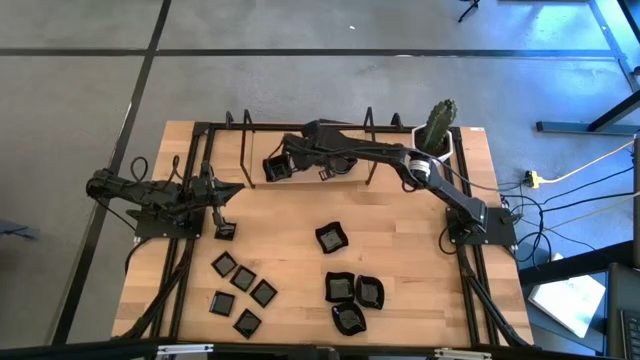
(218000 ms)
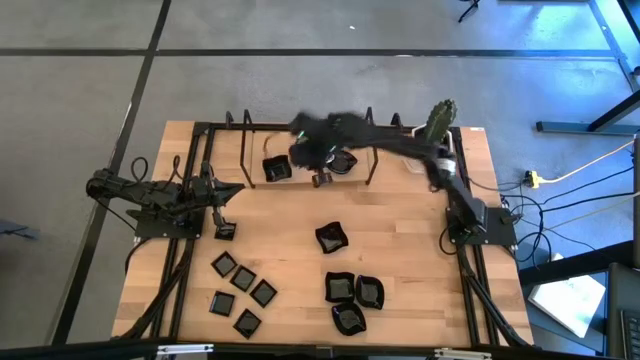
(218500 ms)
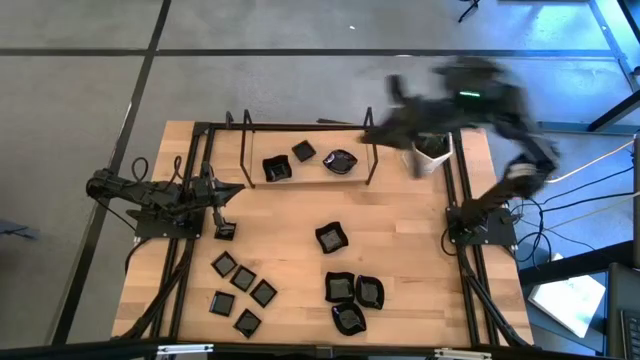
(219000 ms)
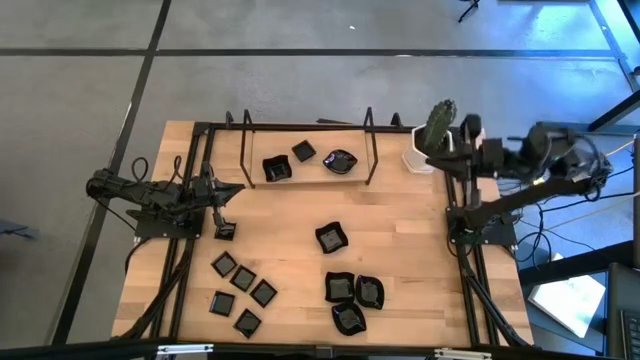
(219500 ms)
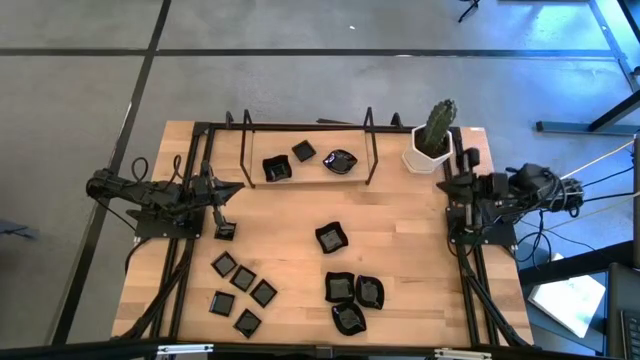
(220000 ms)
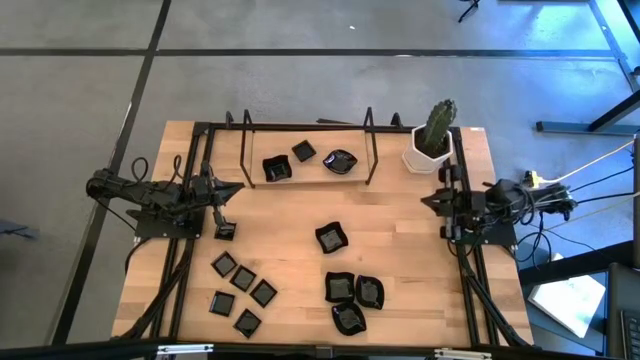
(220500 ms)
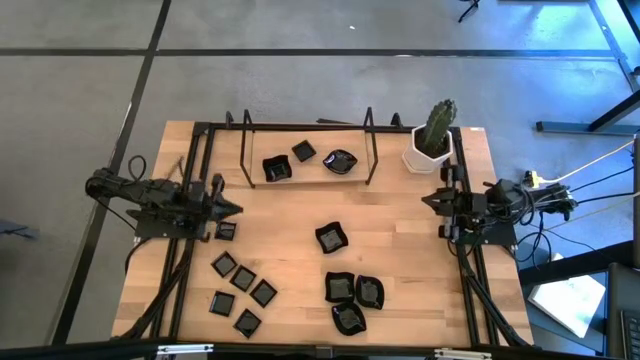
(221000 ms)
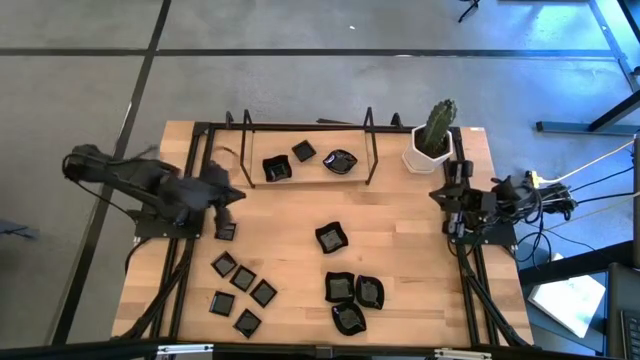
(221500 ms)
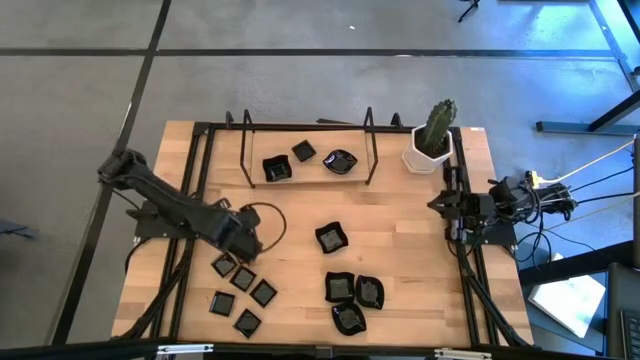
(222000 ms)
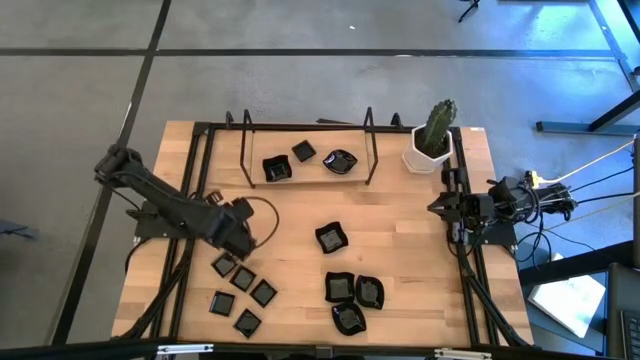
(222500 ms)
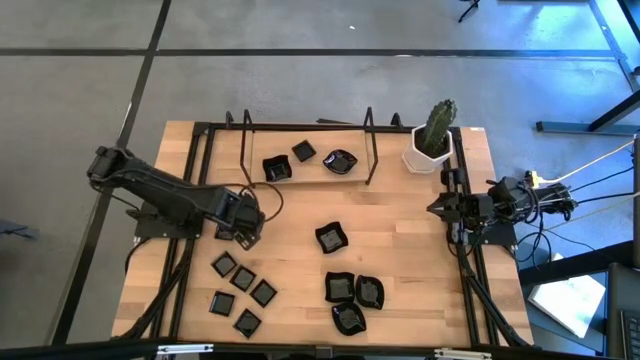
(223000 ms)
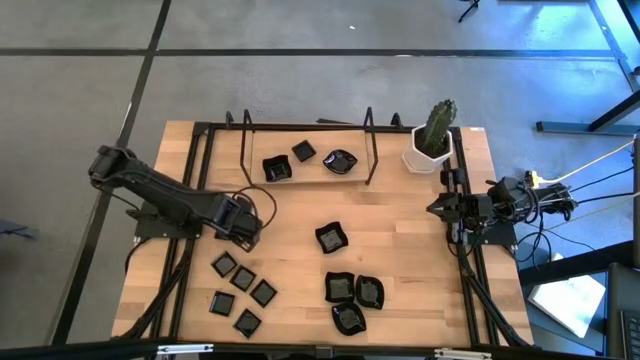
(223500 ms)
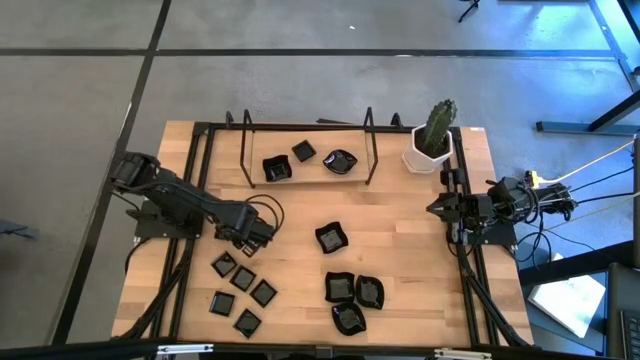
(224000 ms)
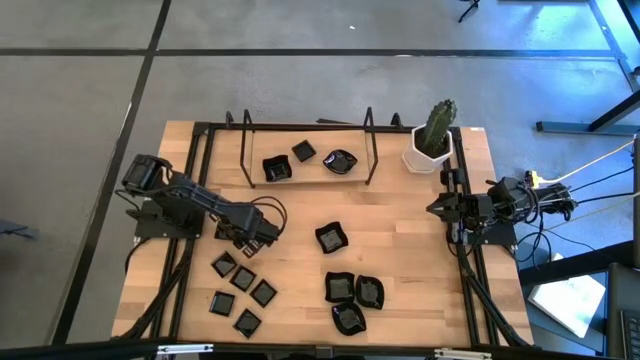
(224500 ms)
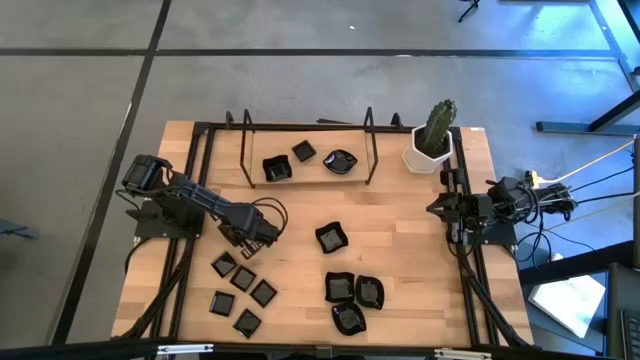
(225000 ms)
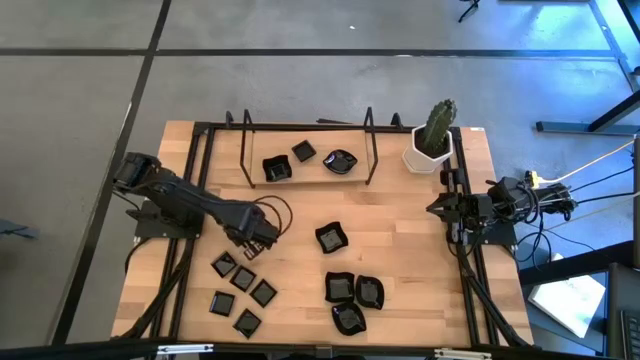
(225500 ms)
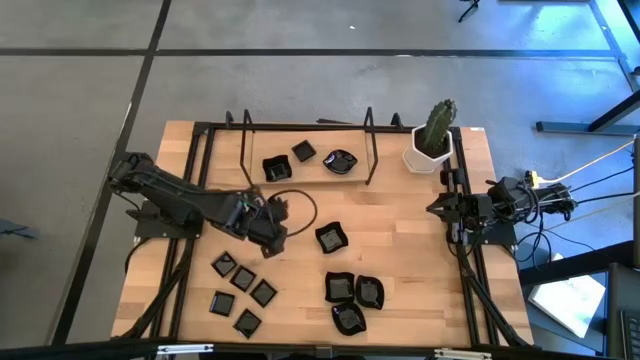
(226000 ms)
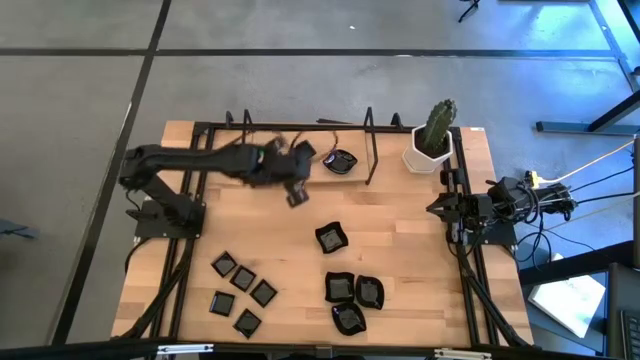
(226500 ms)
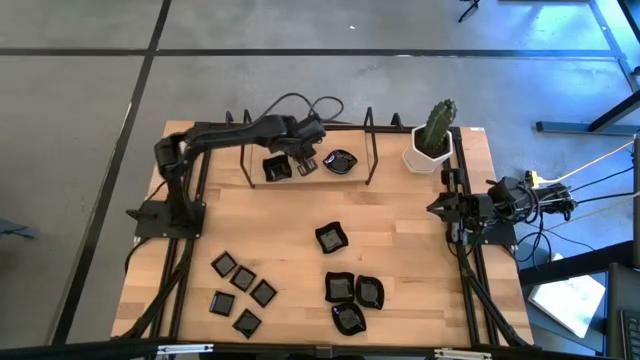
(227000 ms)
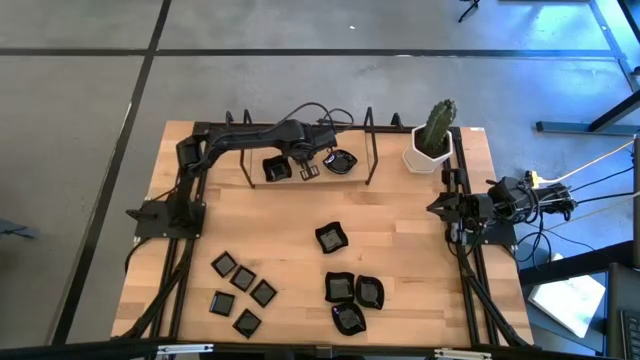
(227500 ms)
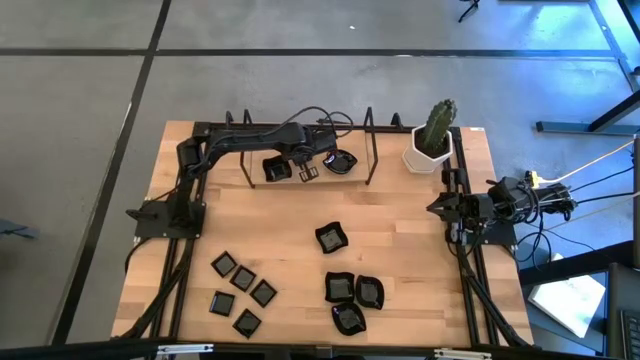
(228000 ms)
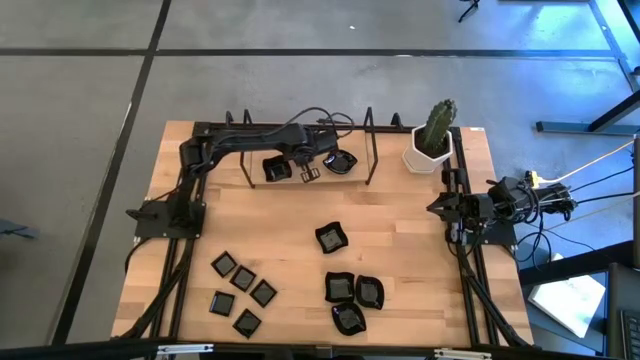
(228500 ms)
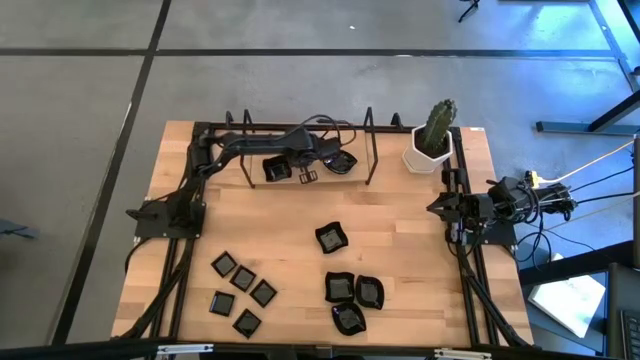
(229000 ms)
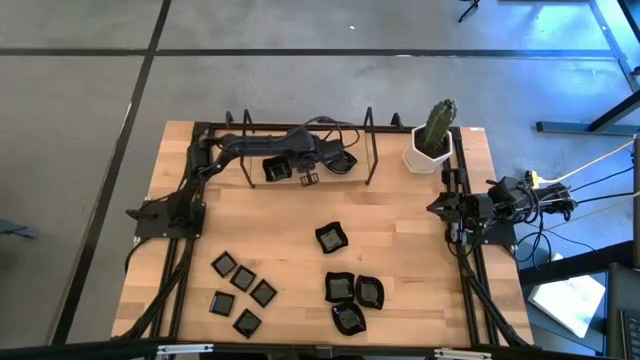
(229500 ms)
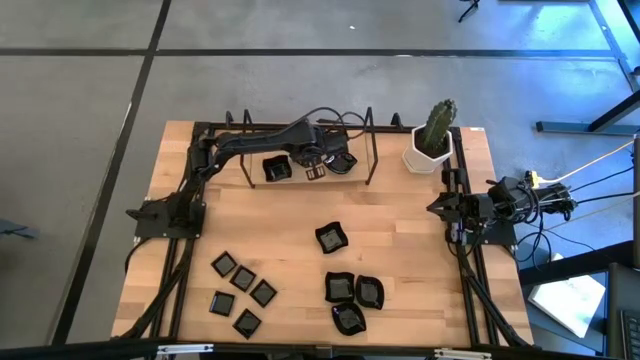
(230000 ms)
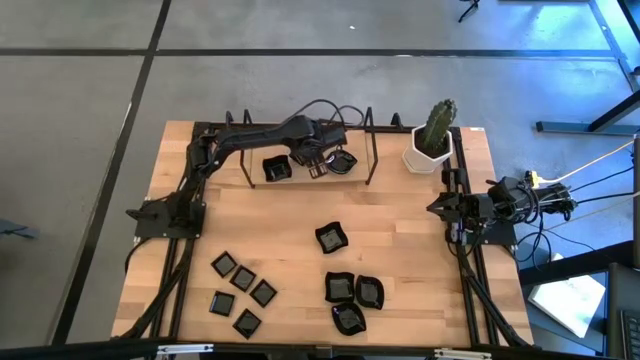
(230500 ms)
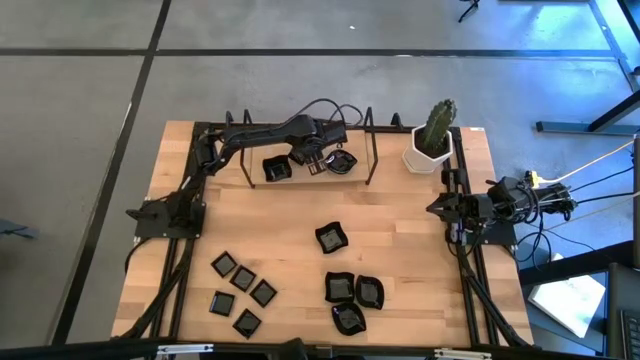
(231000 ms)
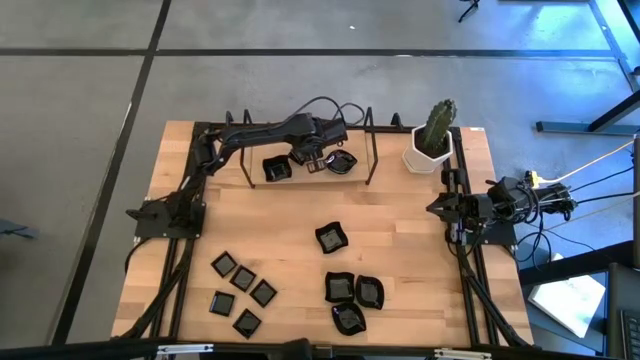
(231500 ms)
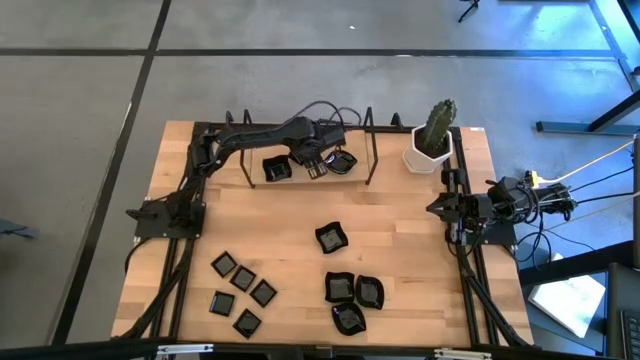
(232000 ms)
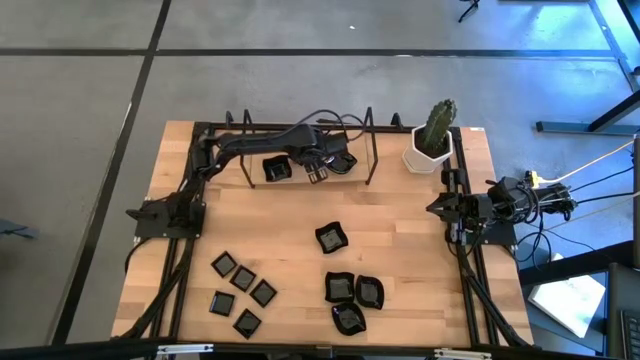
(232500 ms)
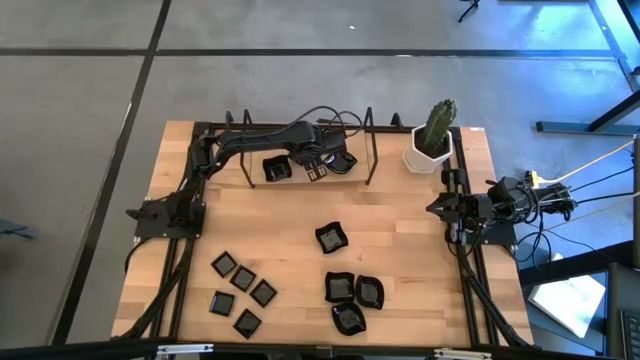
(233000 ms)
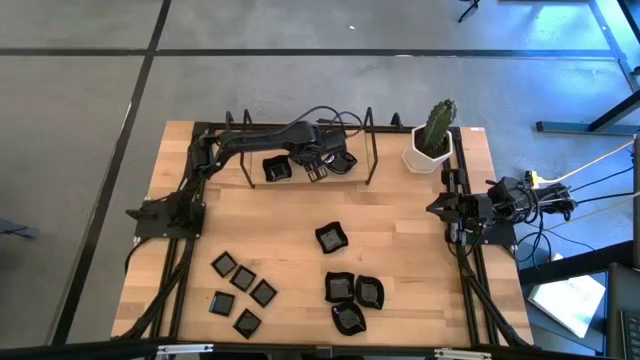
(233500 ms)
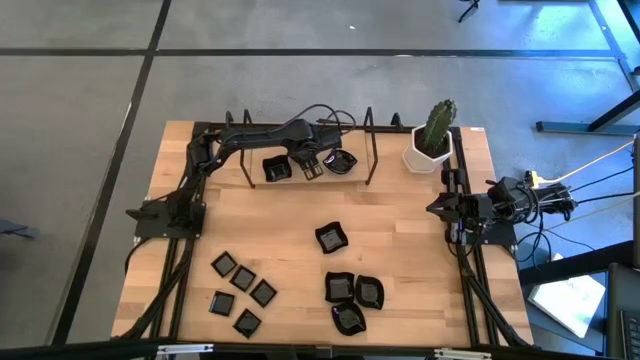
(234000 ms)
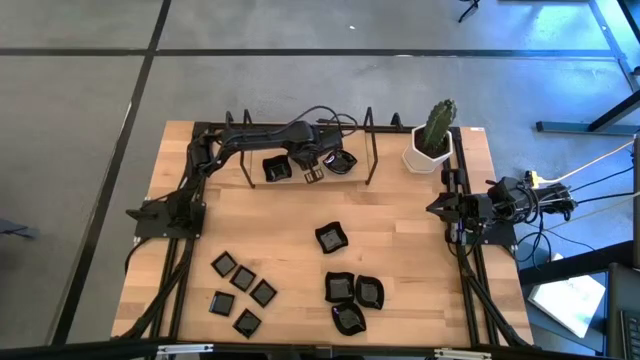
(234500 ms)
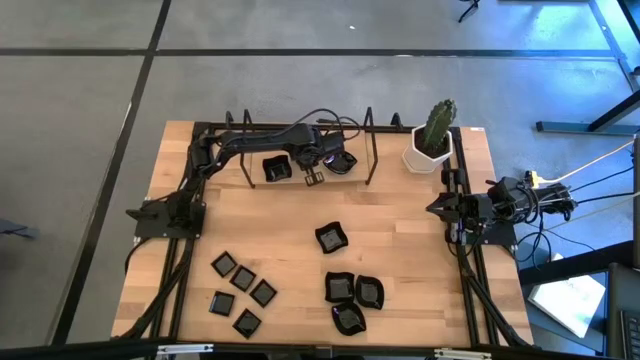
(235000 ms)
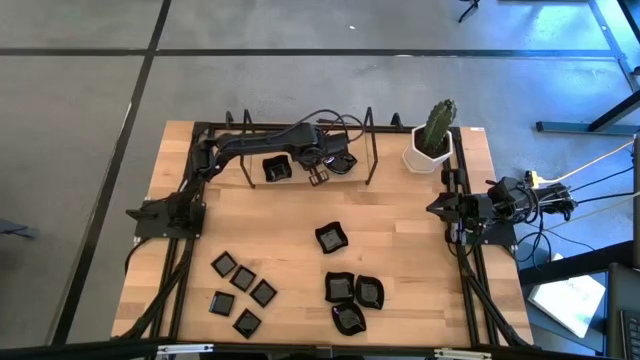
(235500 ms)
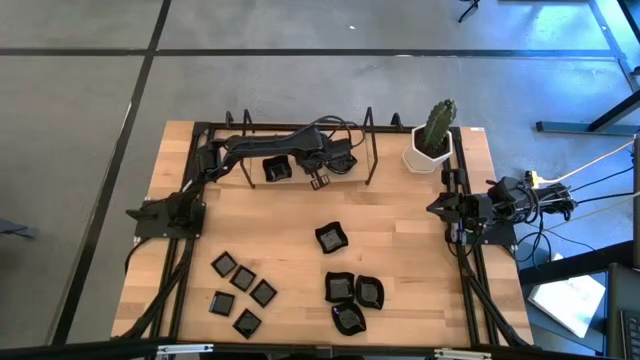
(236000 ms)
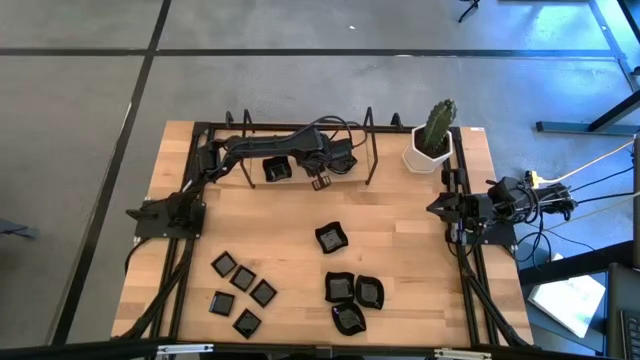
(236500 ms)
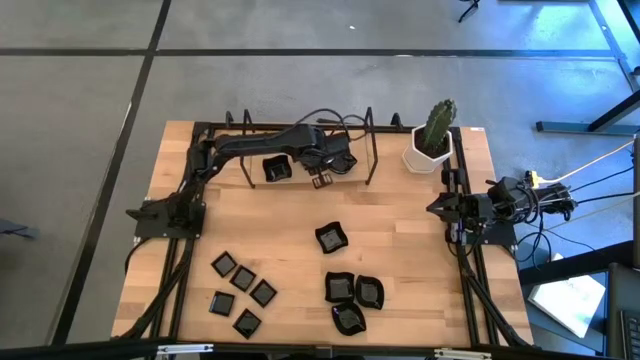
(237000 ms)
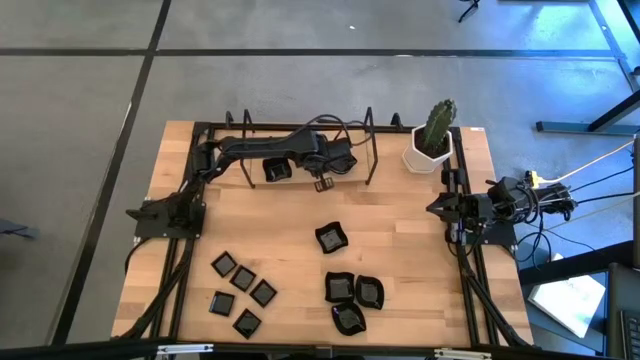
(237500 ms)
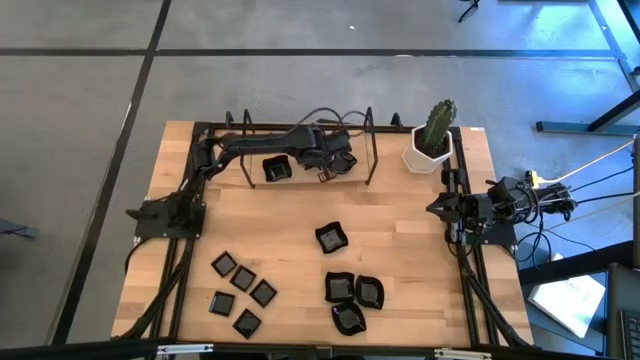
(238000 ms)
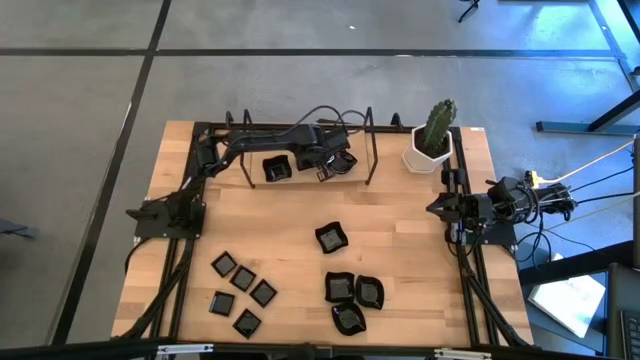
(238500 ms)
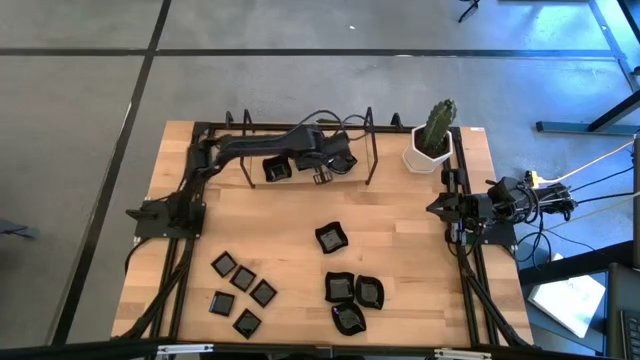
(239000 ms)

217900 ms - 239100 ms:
Task: Pick & Place Mini shaped plates
Stack the square plate on top of the square plate on the shelf

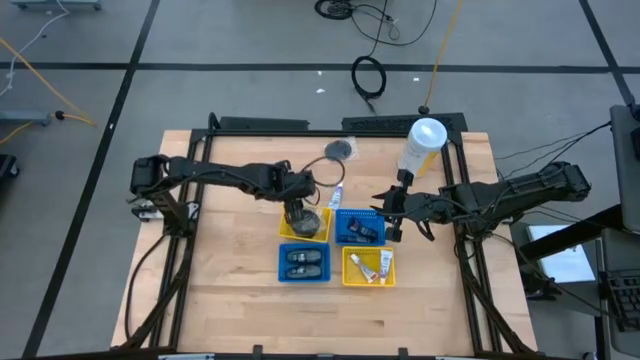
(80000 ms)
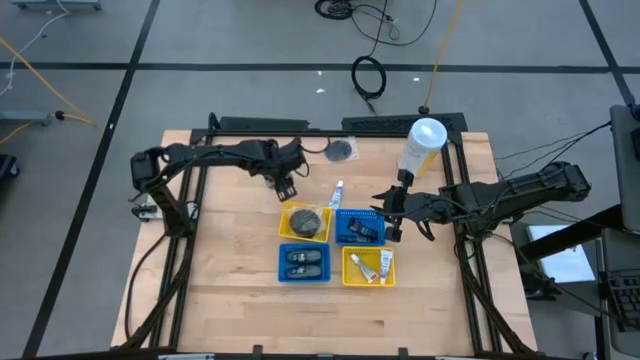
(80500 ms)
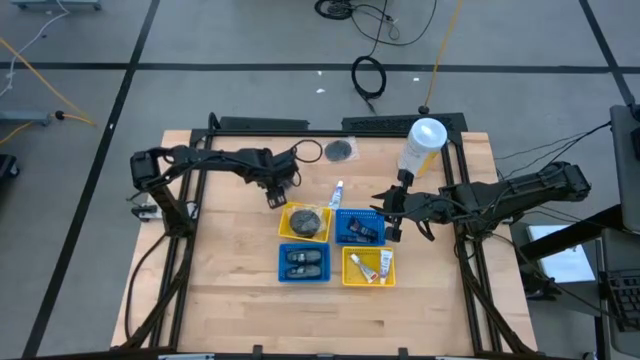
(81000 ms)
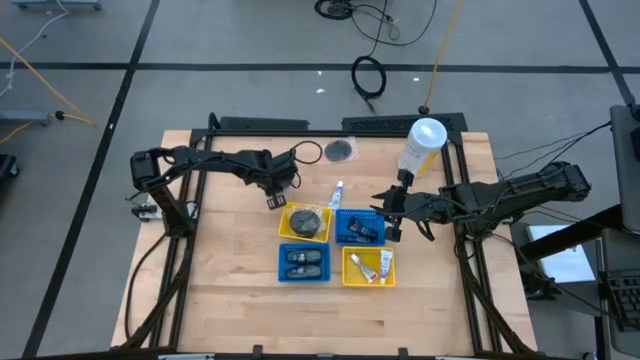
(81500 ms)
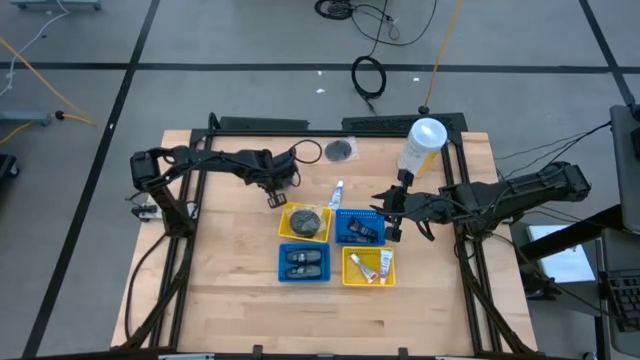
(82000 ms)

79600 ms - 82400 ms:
Task: Pick & Place Travel size toiletries
Put the black hairbrush into the top yellow basket
